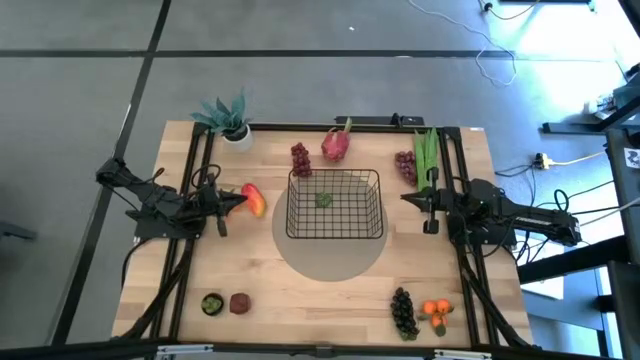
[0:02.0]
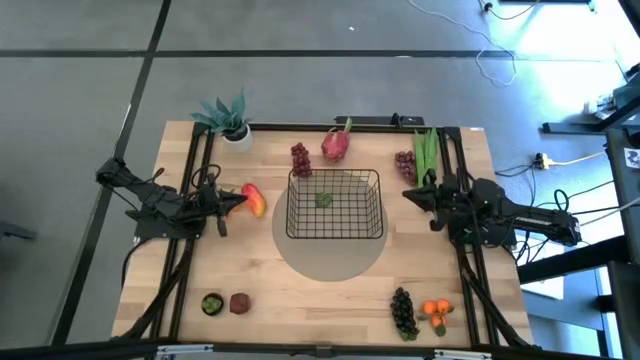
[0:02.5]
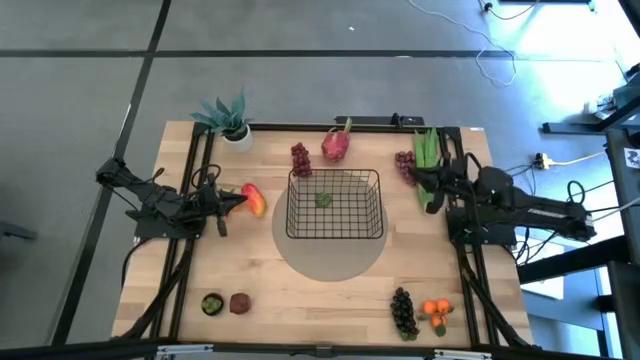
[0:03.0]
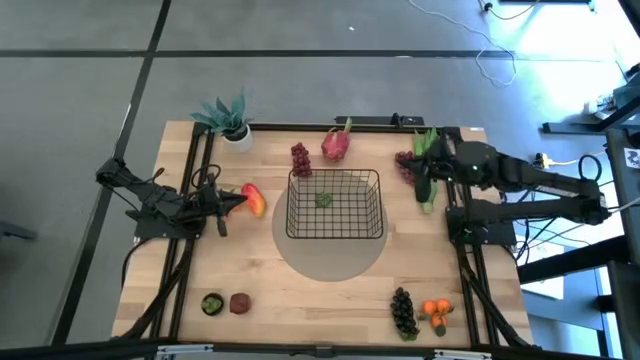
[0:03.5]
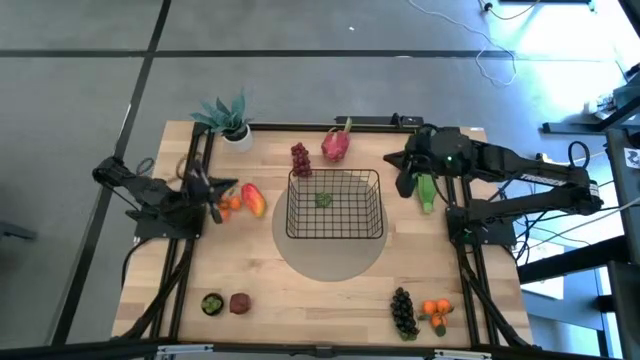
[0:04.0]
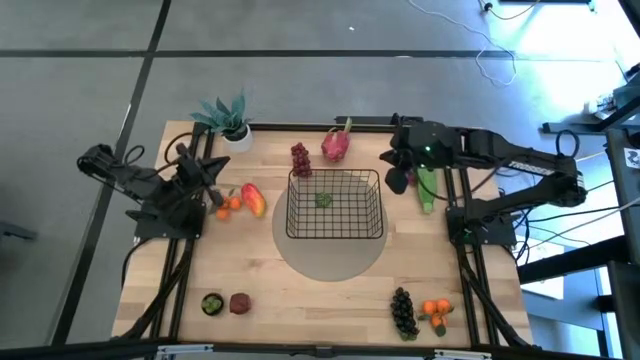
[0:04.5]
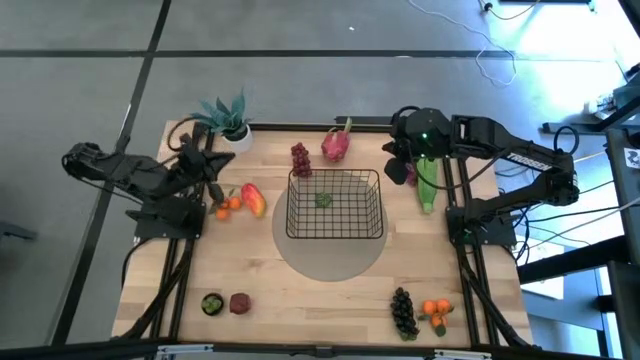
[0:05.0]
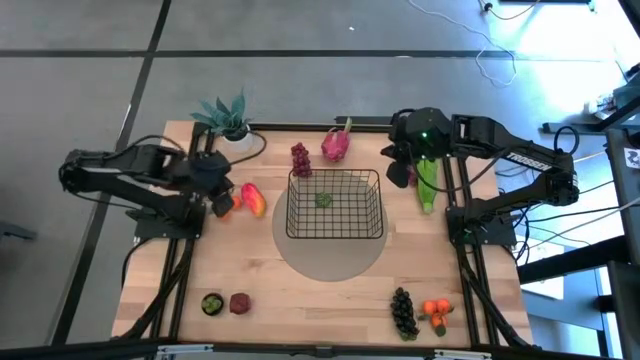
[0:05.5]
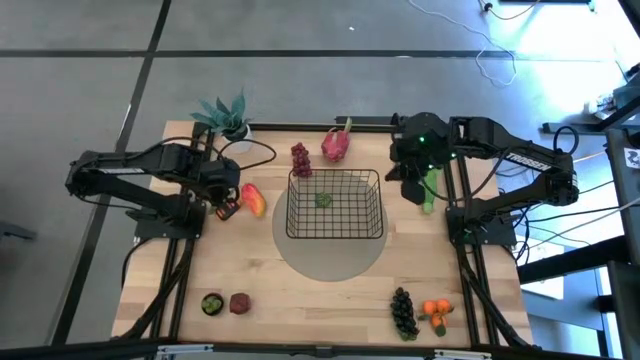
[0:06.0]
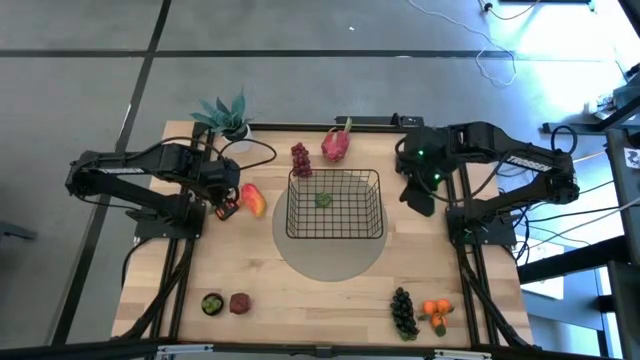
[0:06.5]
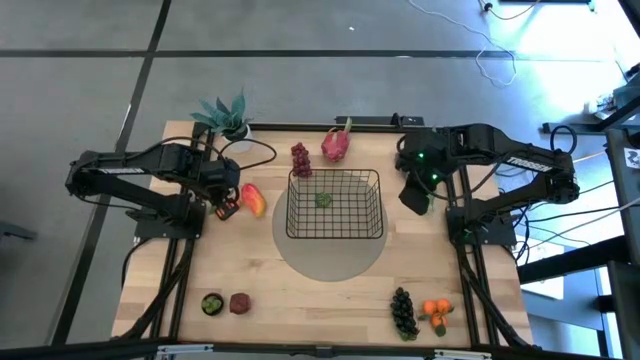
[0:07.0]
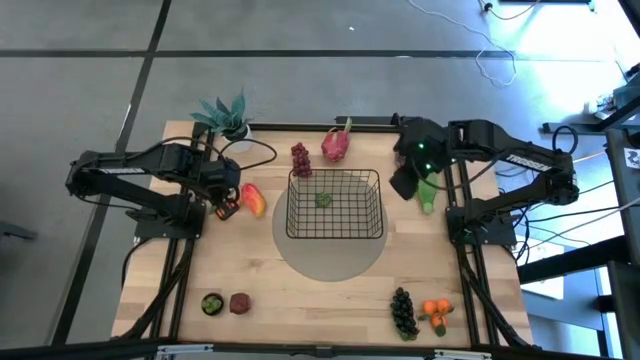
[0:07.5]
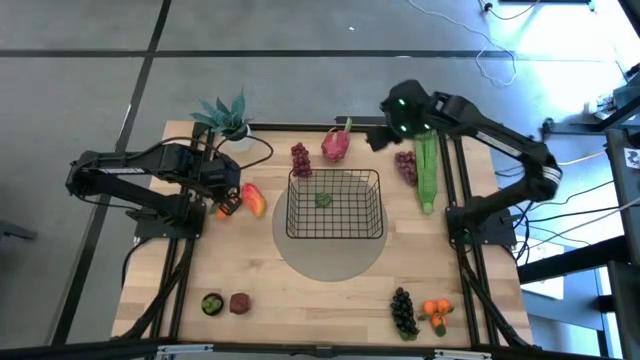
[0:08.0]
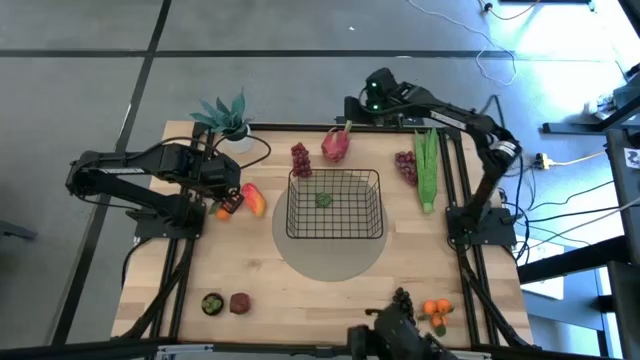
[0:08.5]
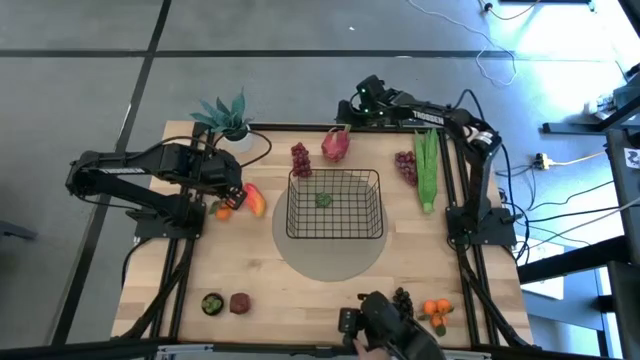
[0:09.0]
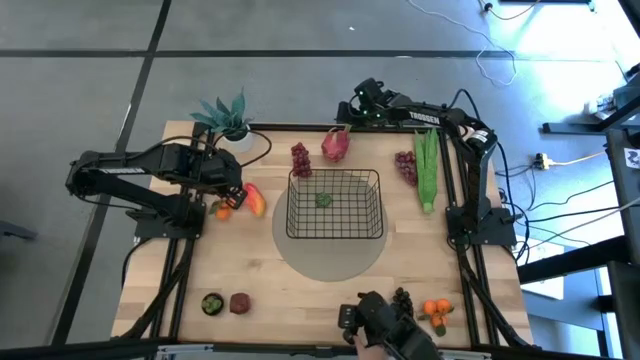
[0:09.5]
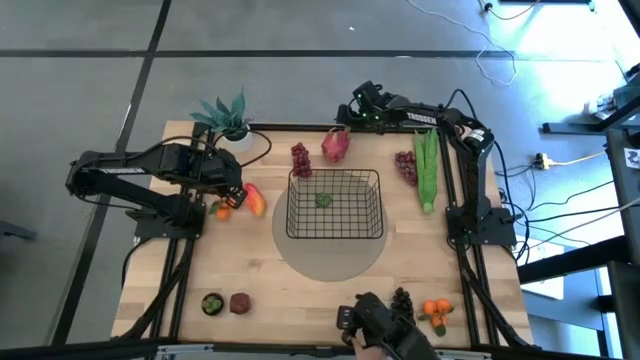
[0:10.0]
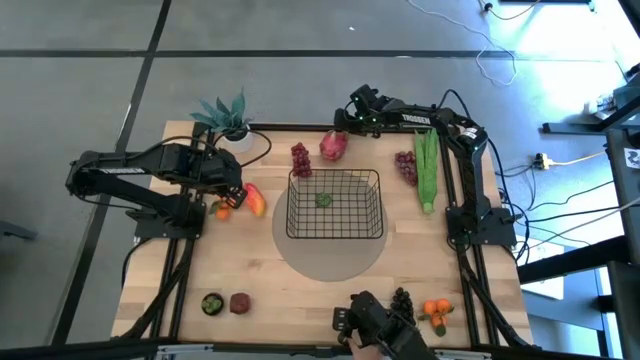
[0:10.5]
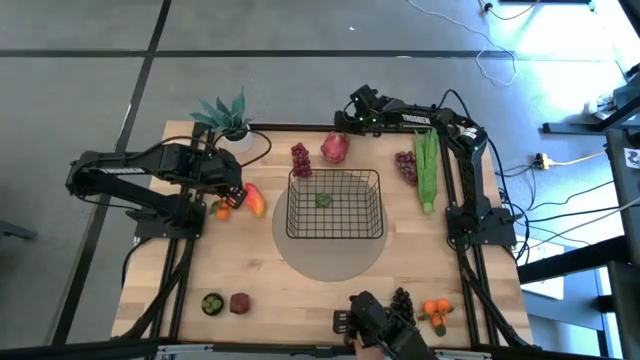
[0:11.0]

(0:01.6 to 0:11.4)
Task: Build produce basket
Put the pink dragon fruit into the black wire basket

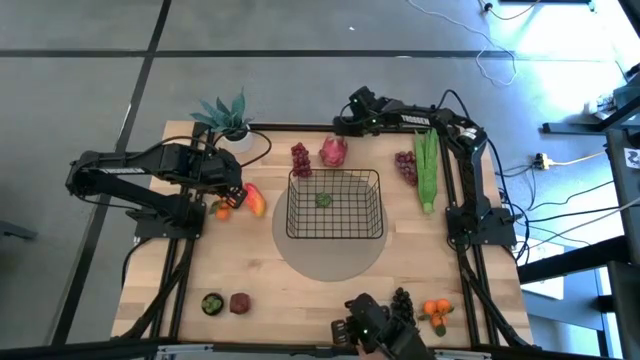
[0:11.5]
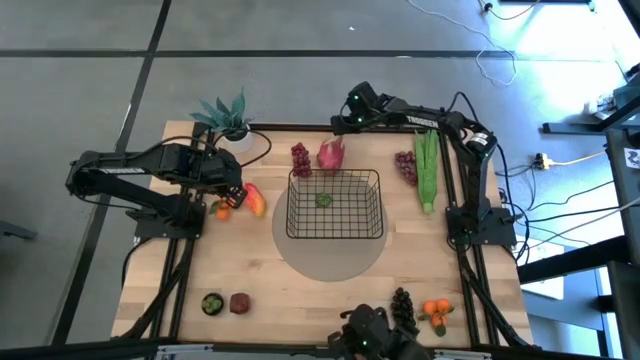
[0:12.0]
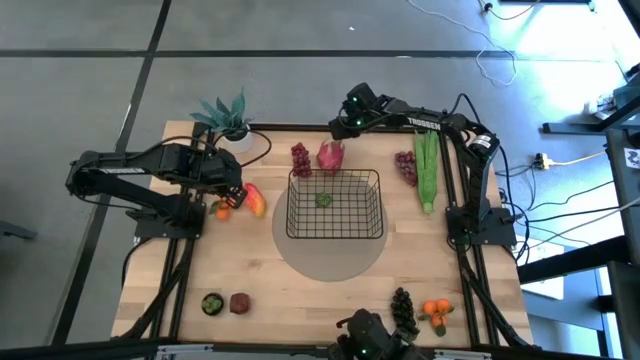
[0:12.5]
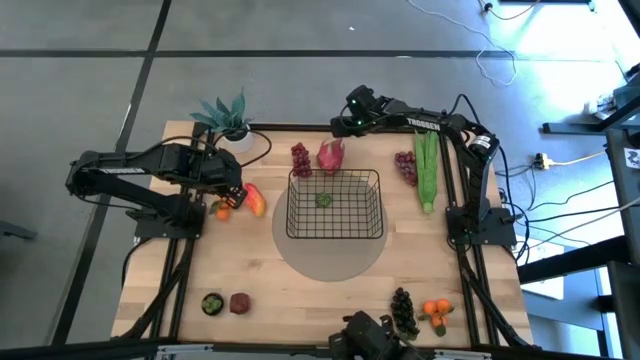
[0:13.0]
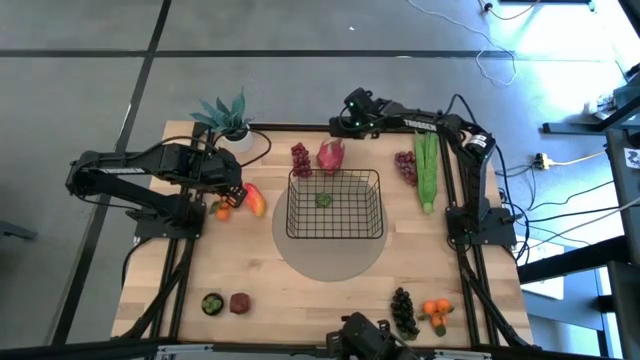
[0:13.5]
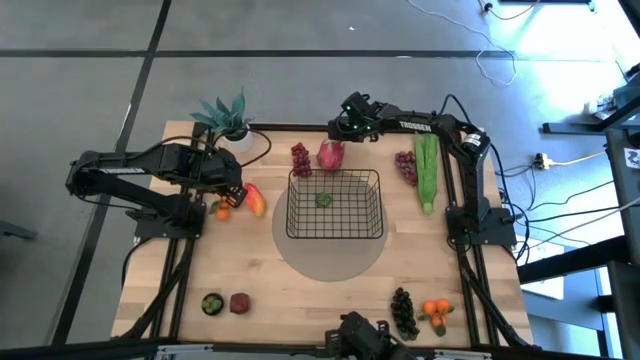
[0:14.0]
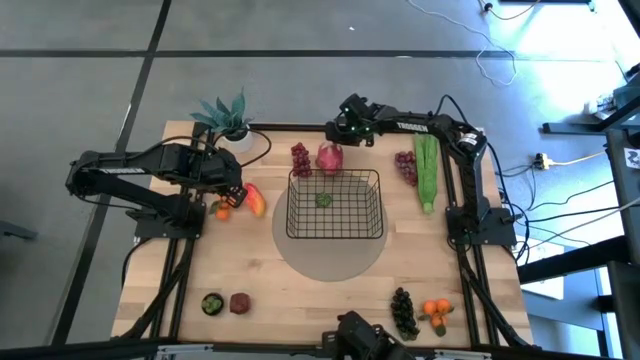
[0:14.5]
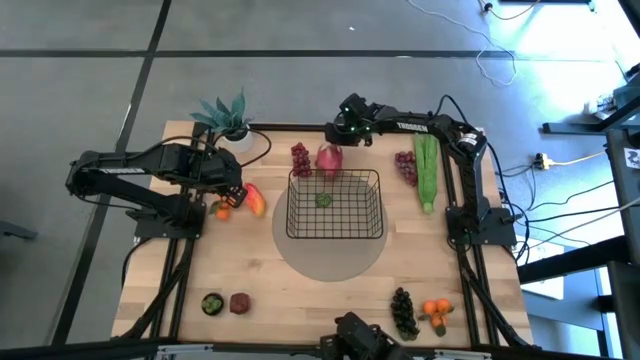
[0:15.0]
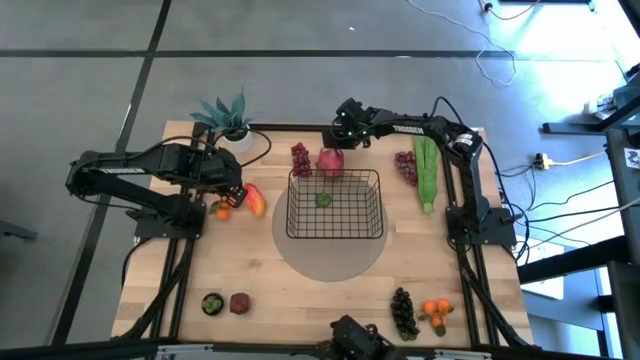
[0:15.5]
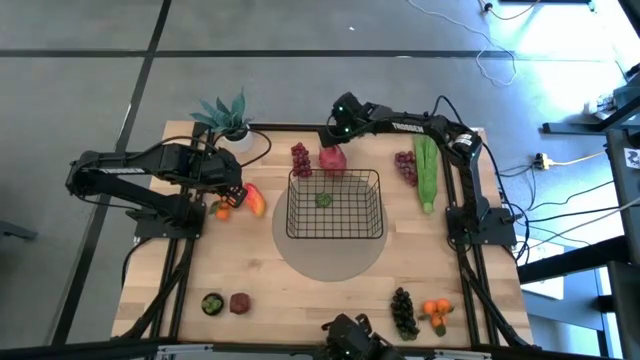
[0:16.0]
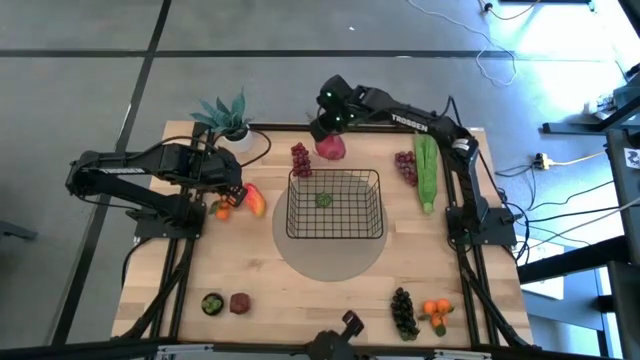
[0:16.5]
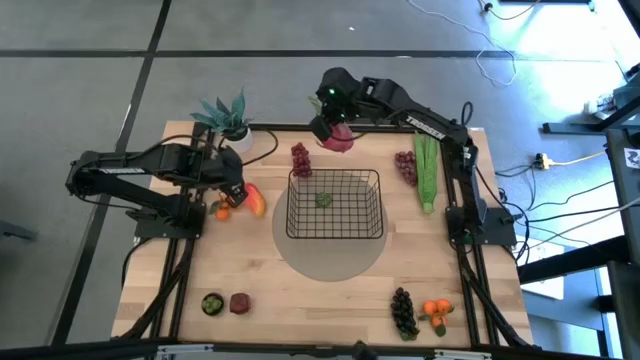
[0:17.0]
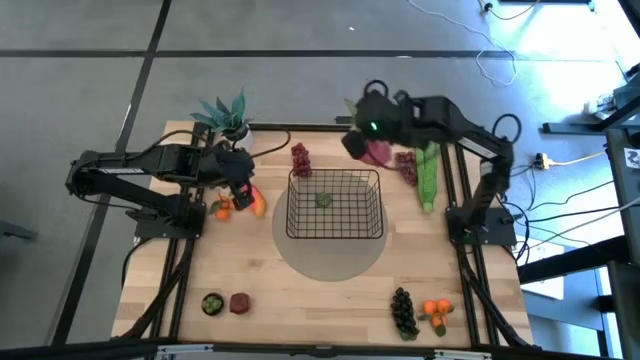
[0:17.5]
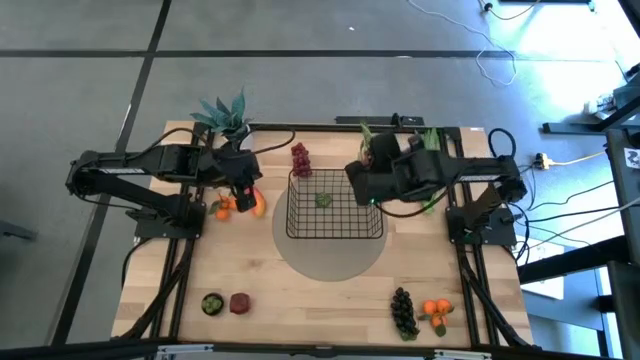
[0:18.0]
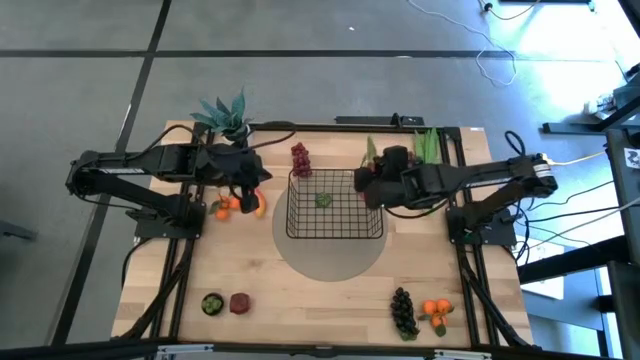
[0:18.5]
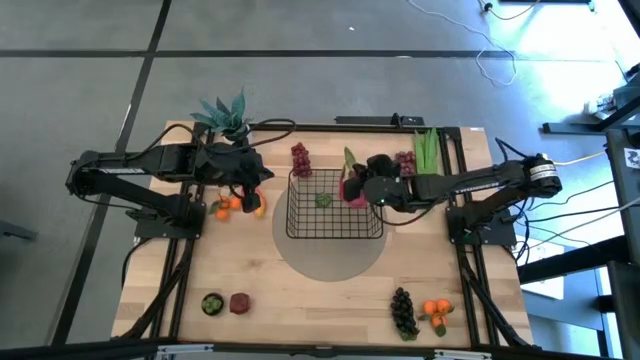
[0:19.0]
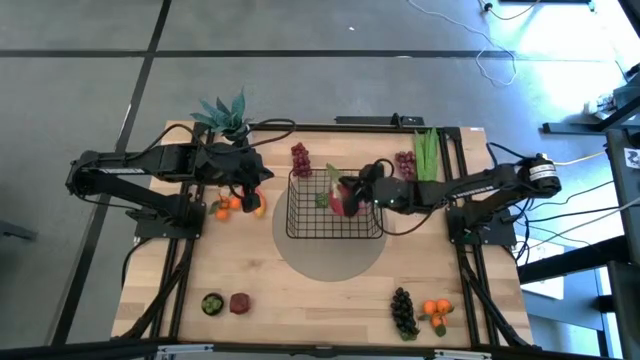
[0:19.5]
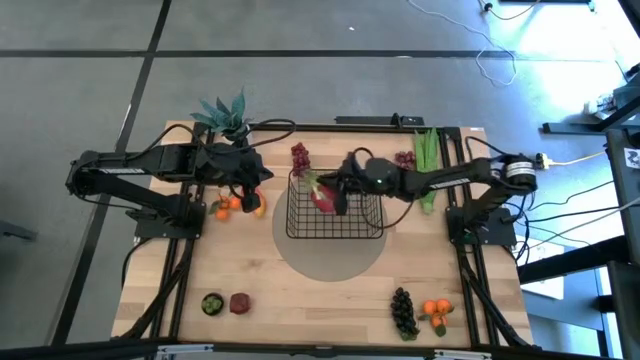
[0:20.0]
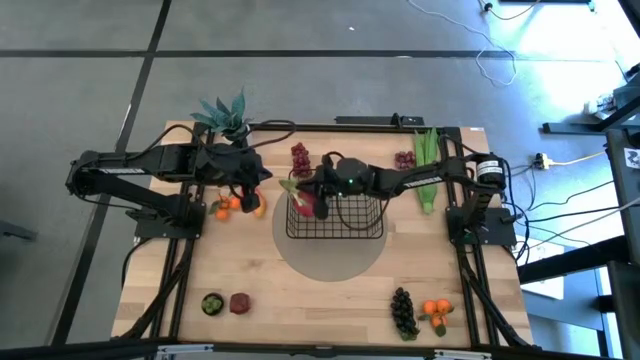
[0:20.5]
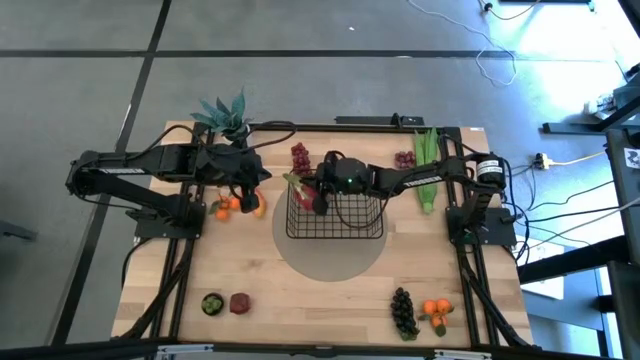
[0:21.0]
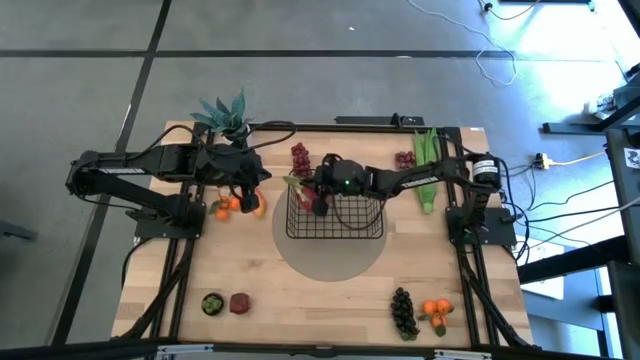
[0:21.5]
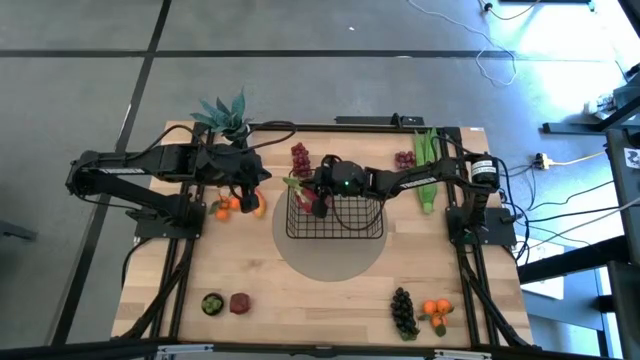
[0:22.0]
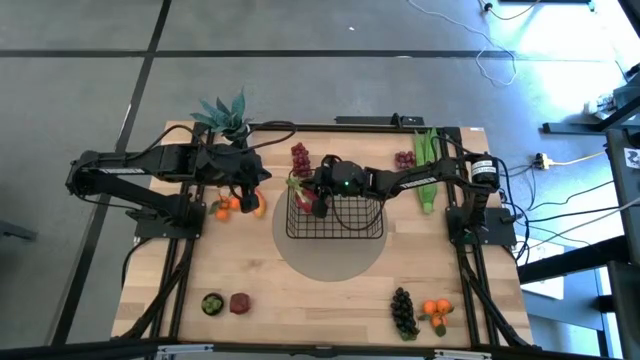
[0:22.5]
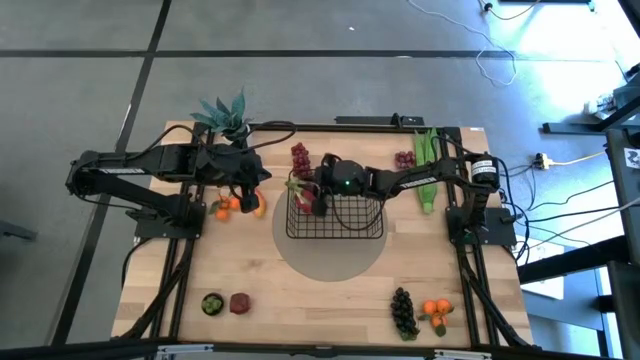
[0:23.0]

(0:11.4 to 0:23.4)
Put the pink dragon fruit into the black wire basket
